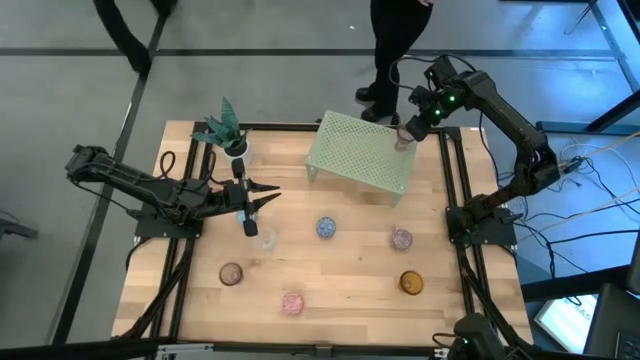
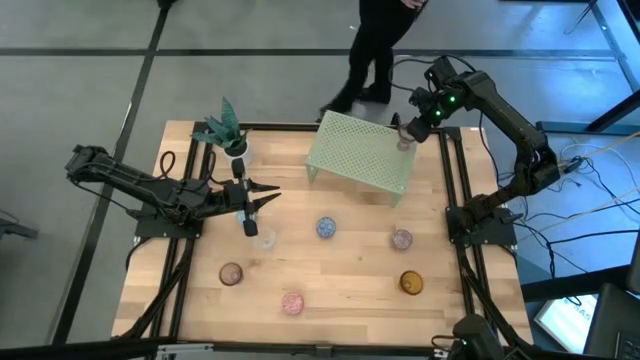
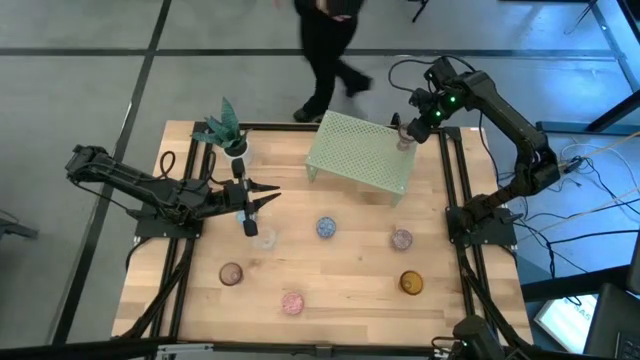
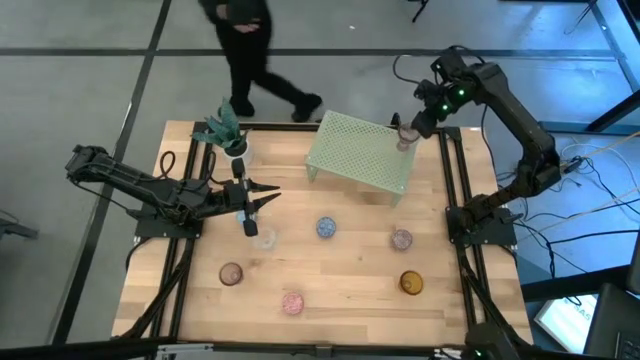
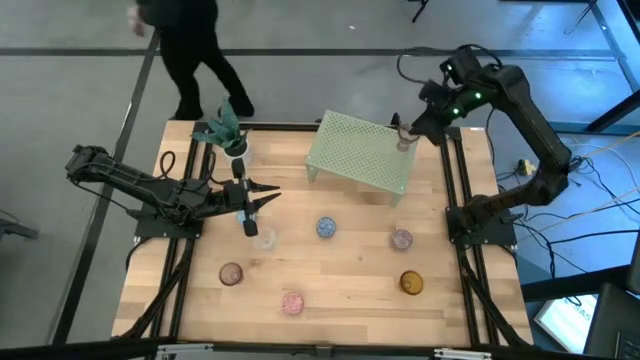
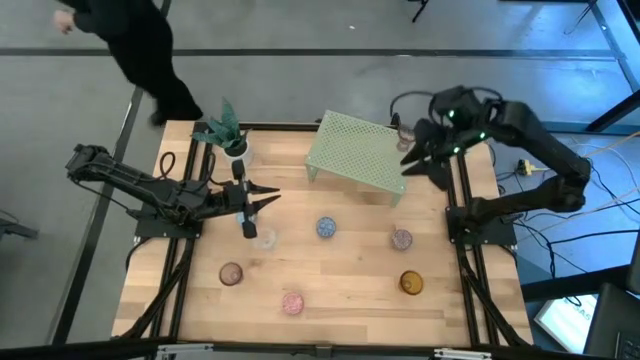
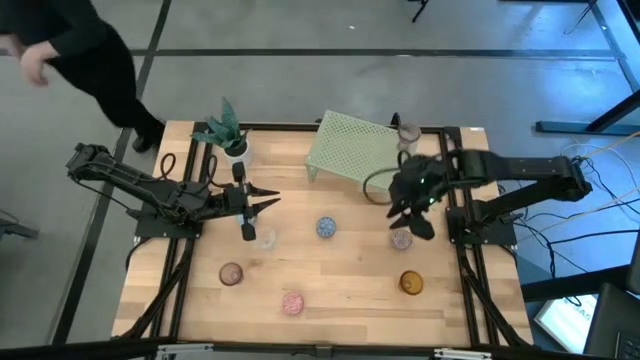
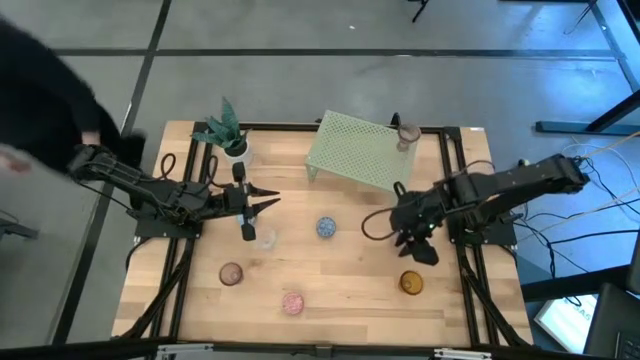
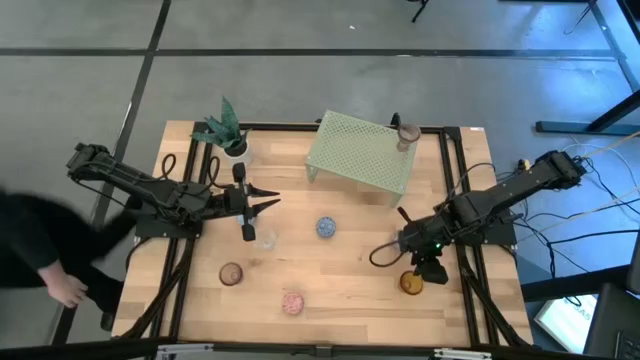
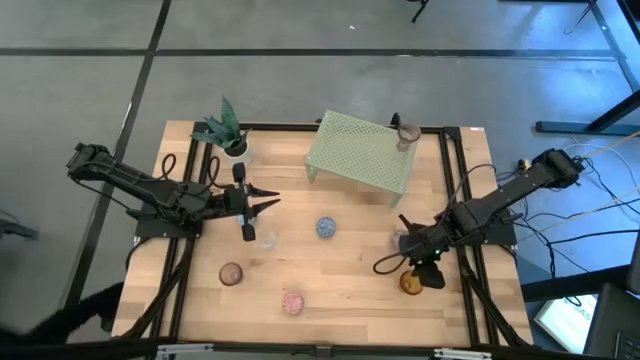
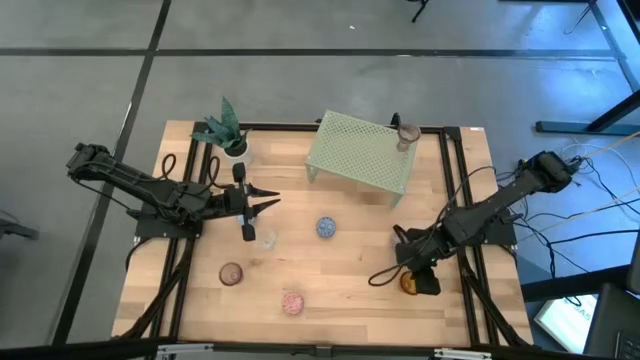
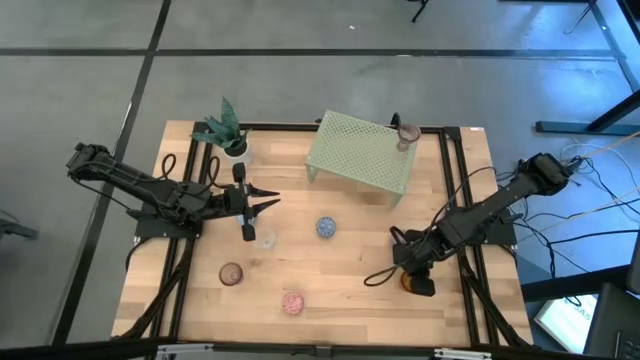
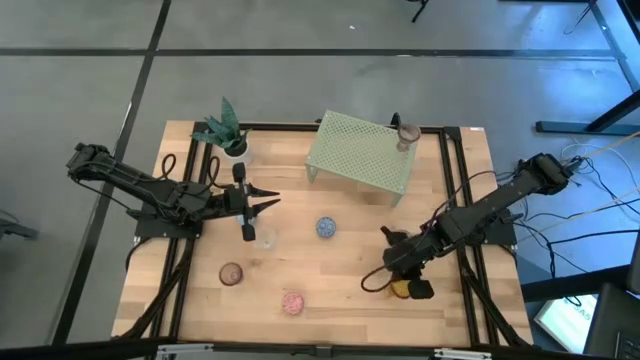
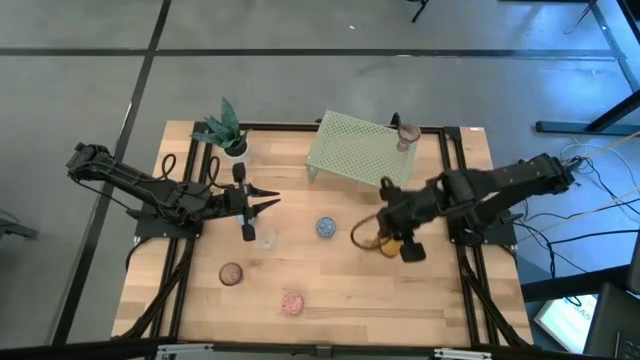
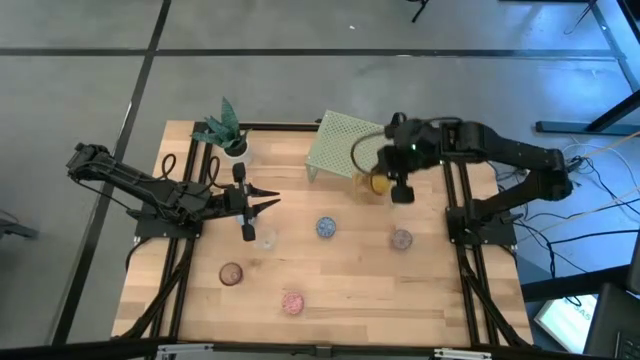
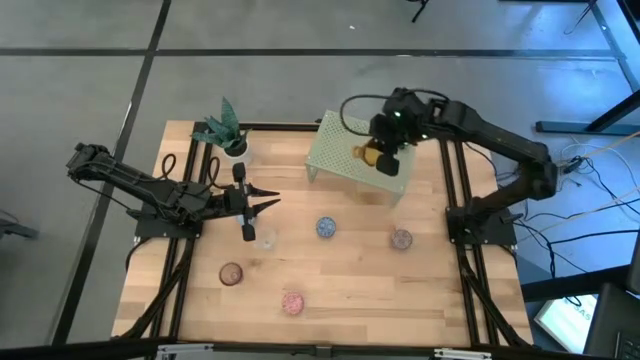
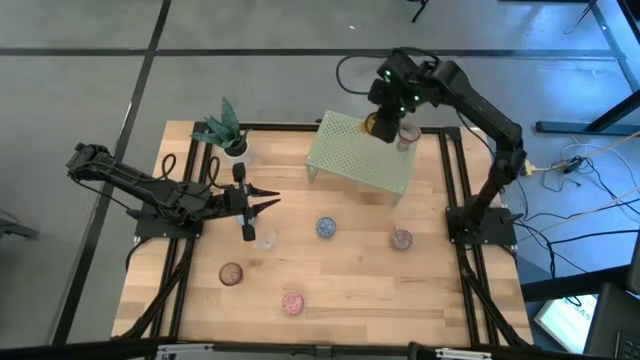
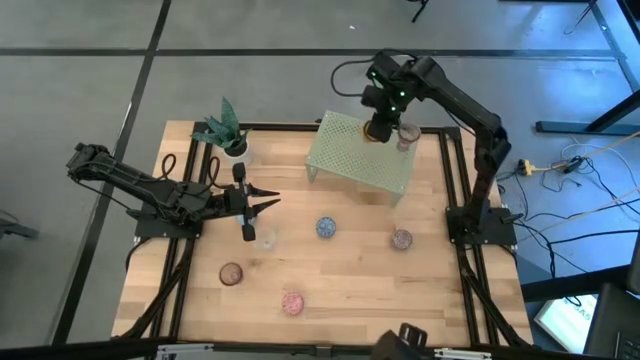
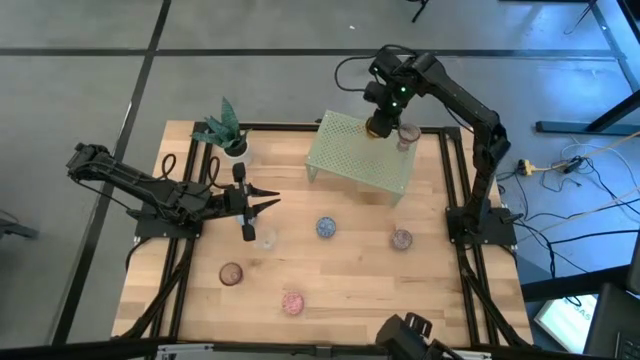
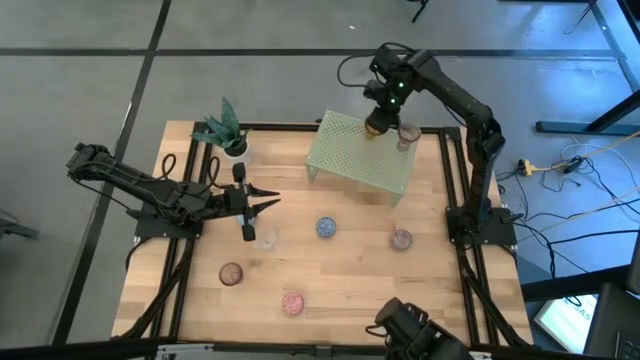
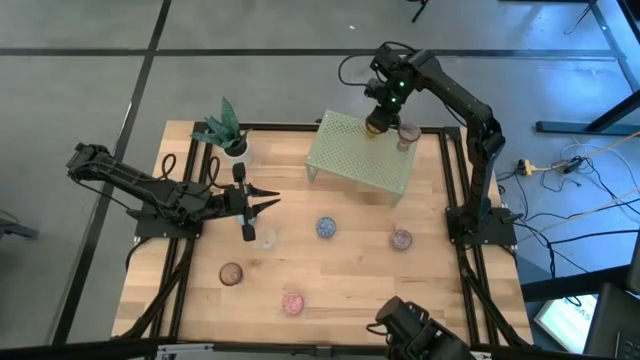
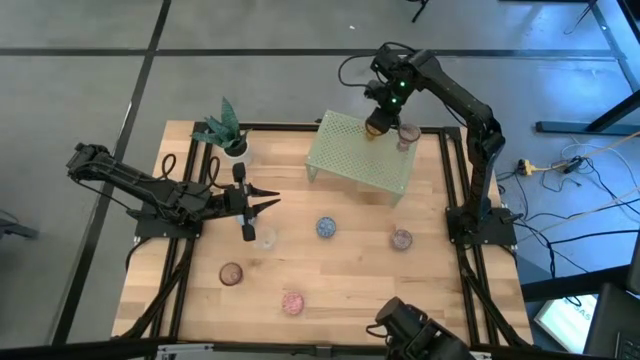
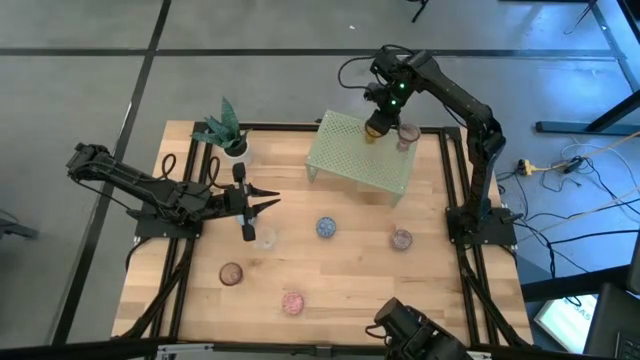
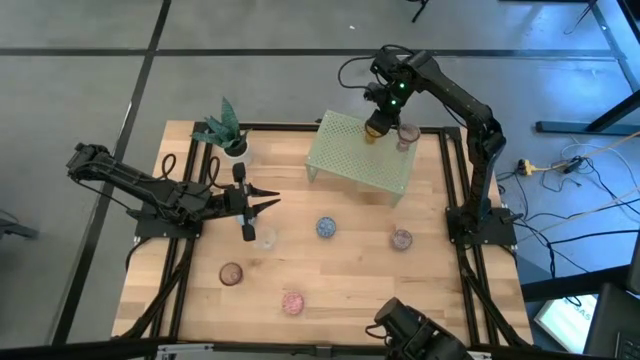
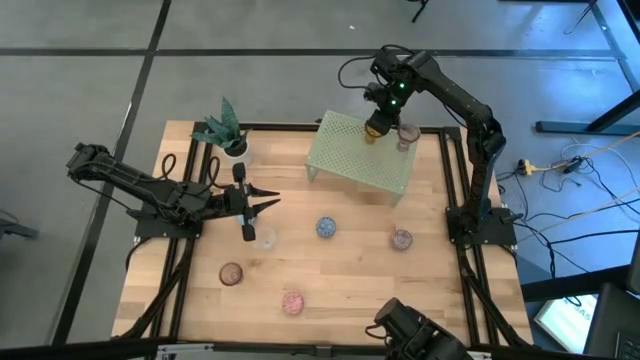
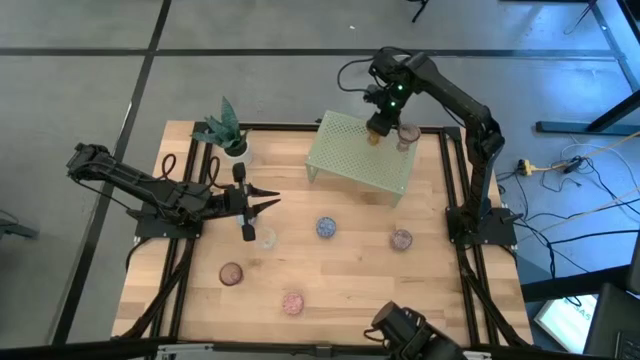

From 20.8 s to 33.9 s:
Task: Pick & Place candle stick holders
Put the brown candle holder on the shelf aligned with the pink candle holder

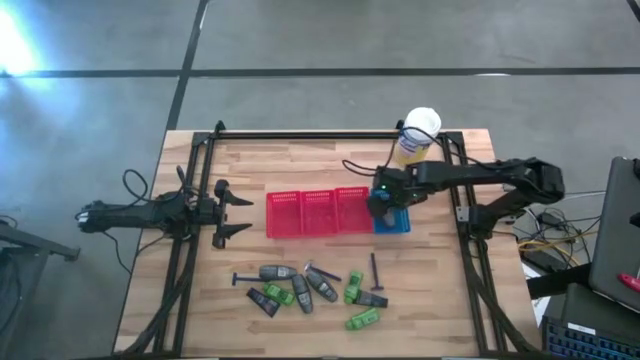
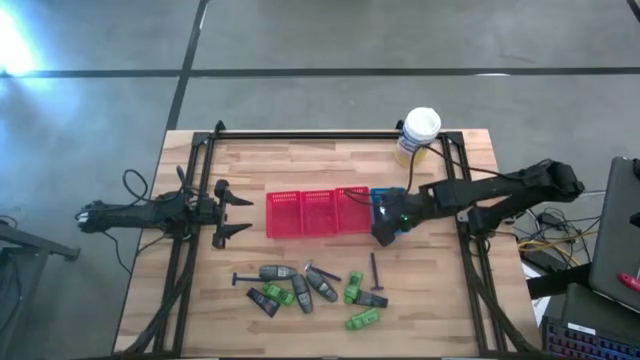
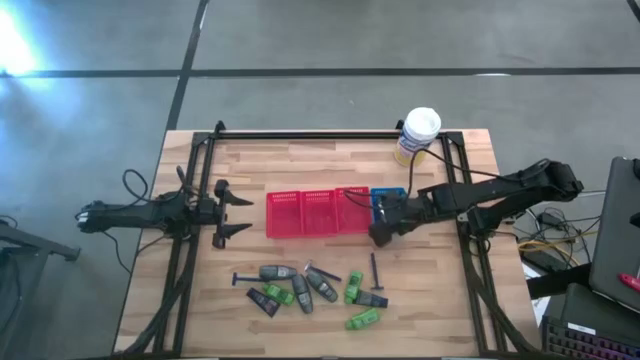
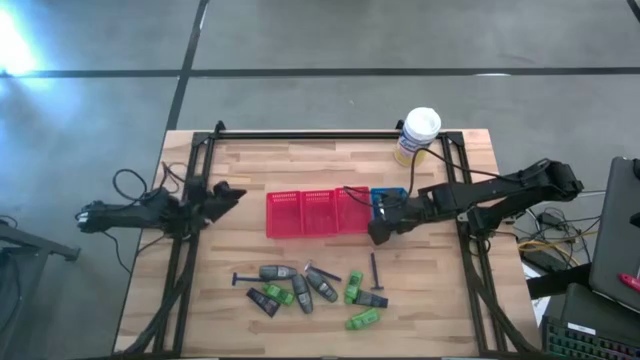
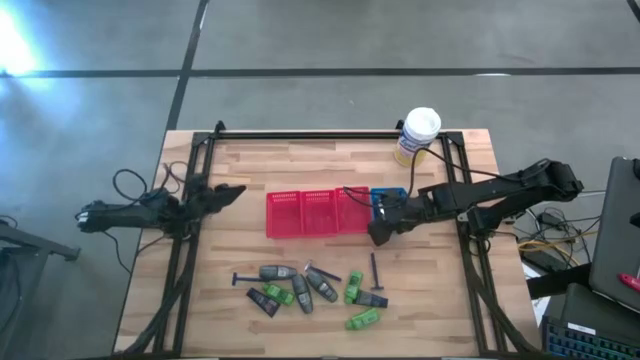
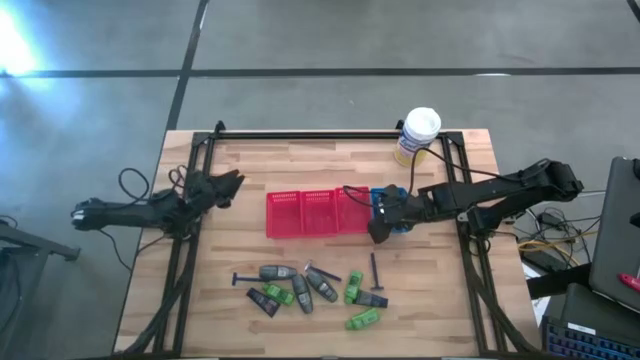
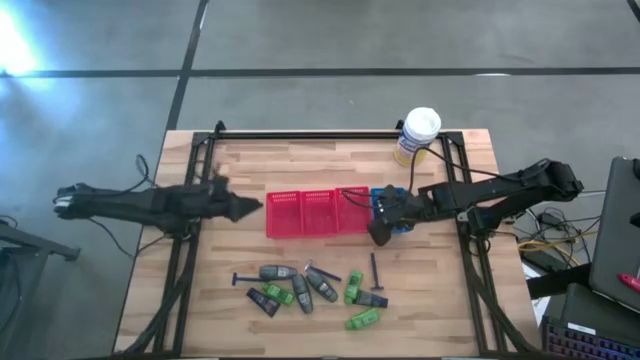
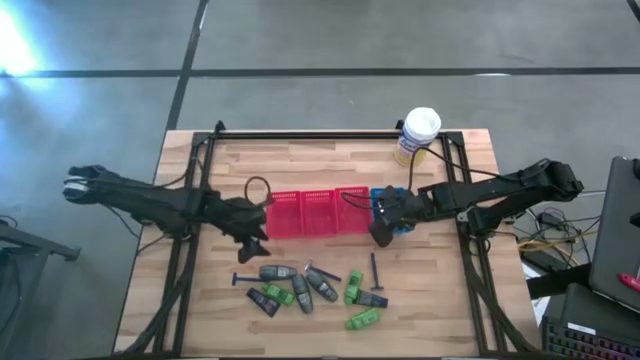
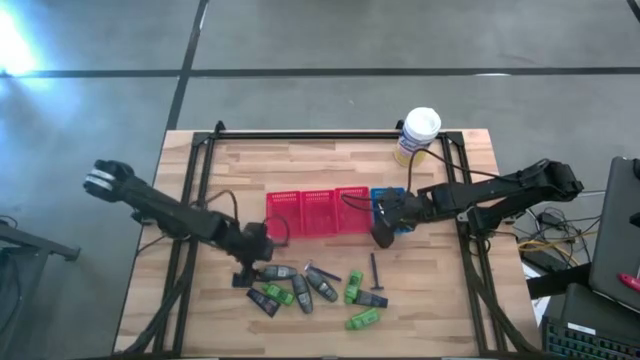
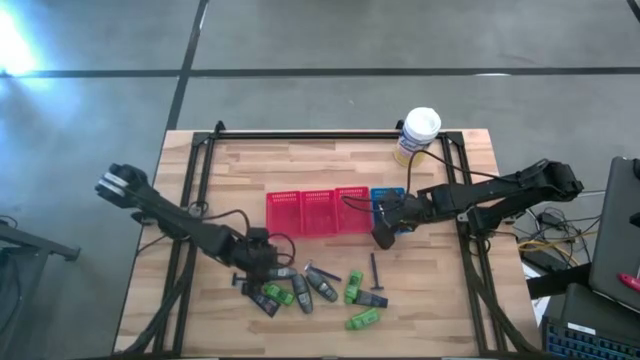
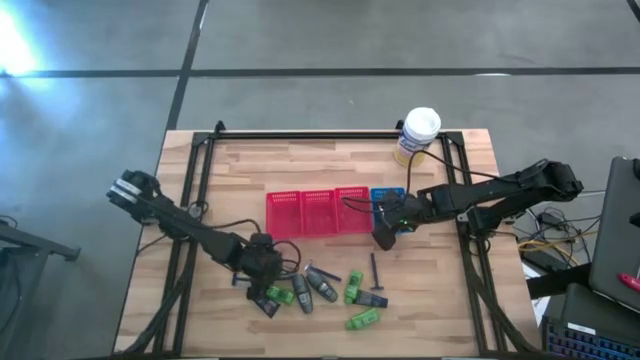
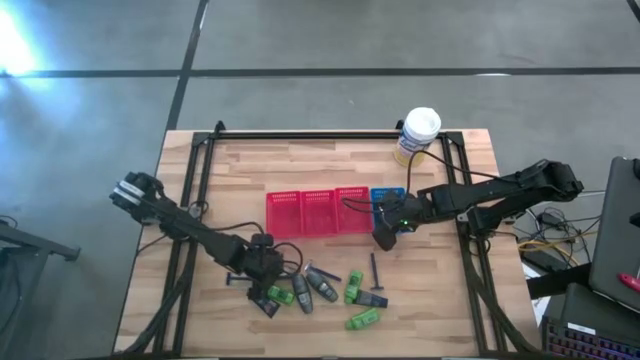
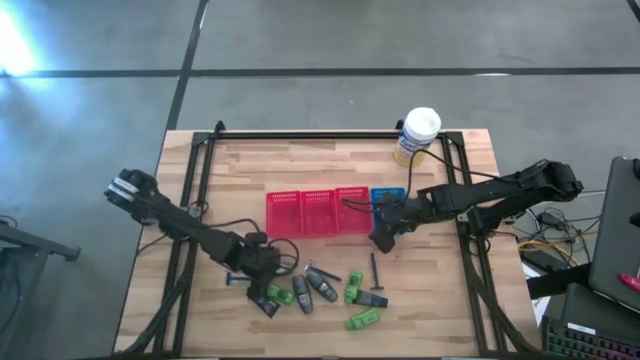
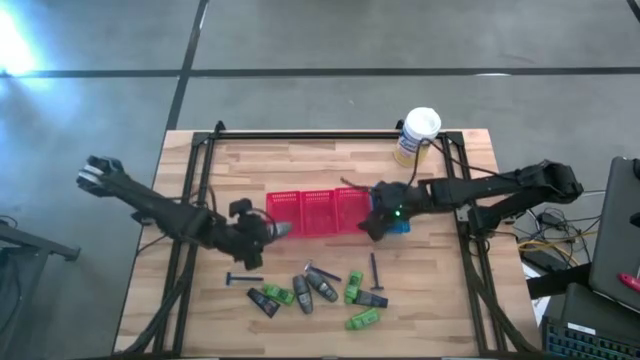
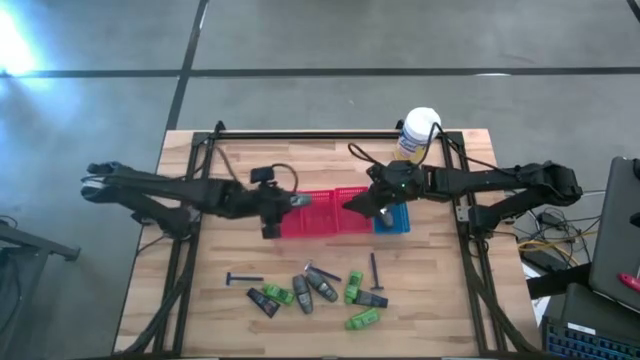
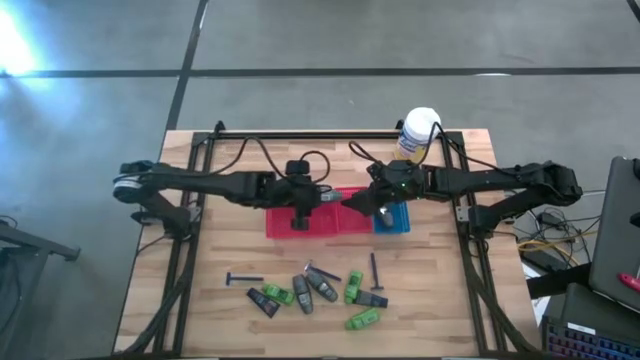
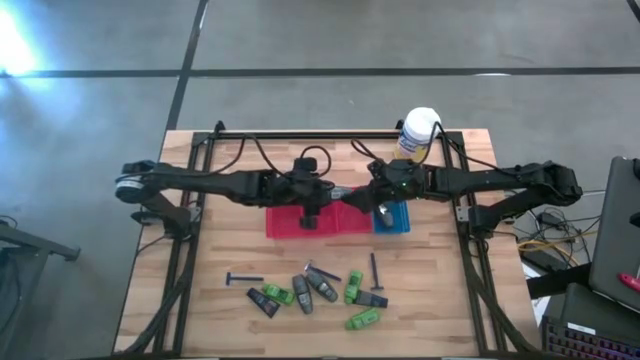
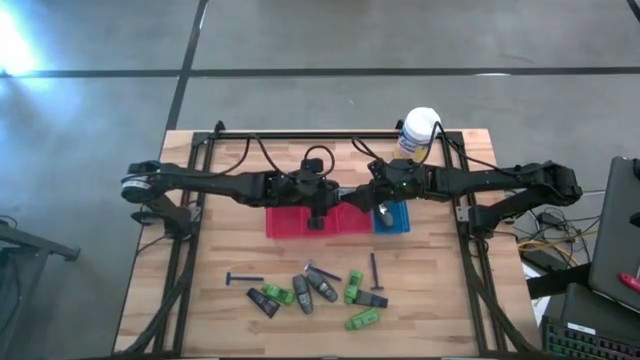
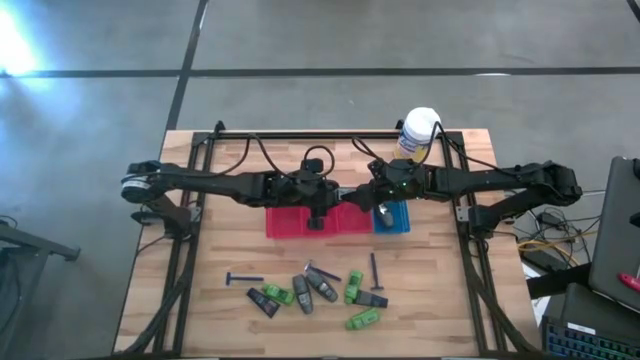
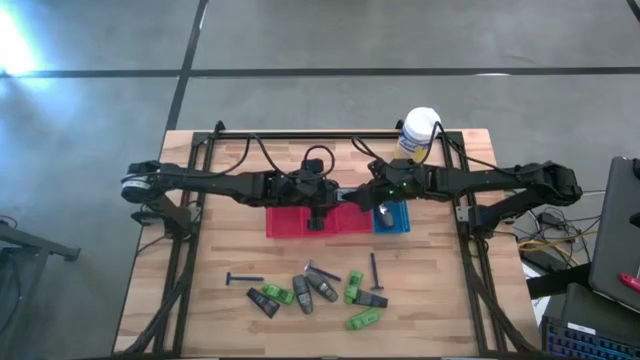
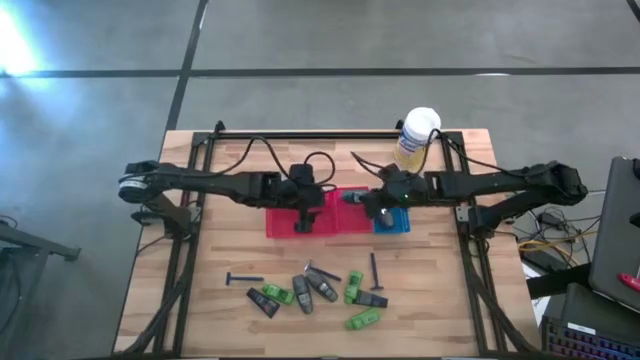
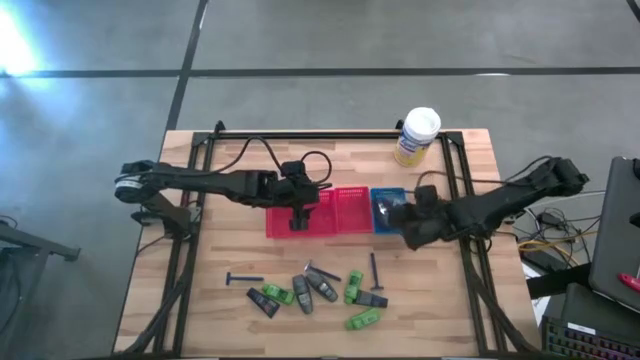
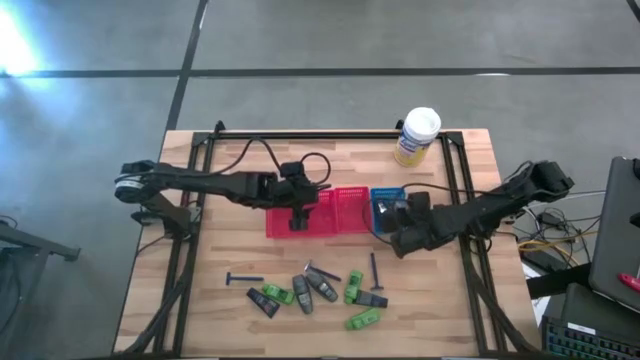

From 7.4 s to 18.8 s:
Task: Pick & Place Travel size toiletries
Put the gray deodorant into the blue bin
